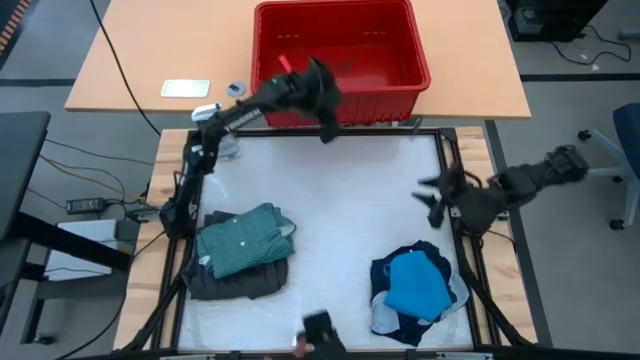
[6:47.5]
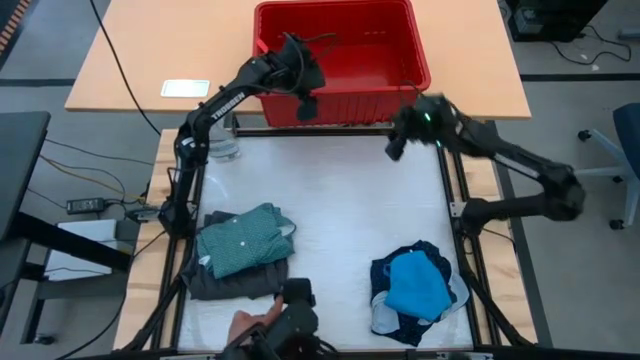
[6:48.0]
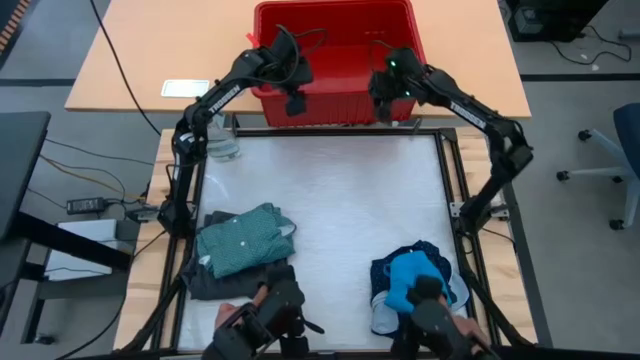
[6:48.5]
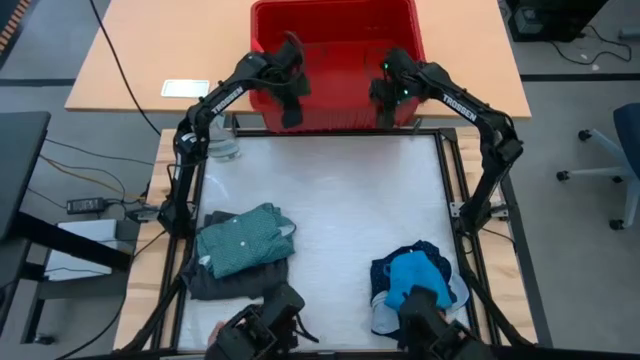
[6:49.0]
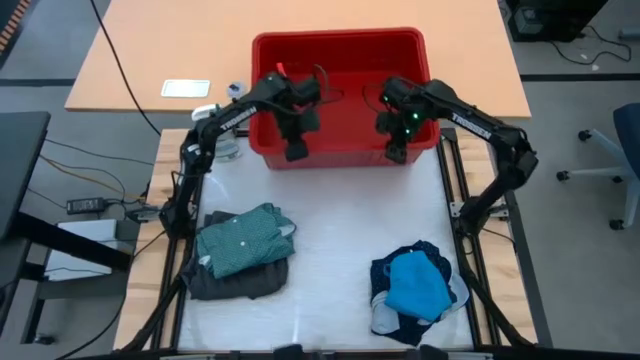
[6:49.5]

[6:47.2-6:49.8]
Task: Fold Laundry from Bin
Adjust the red organizer bin on the table

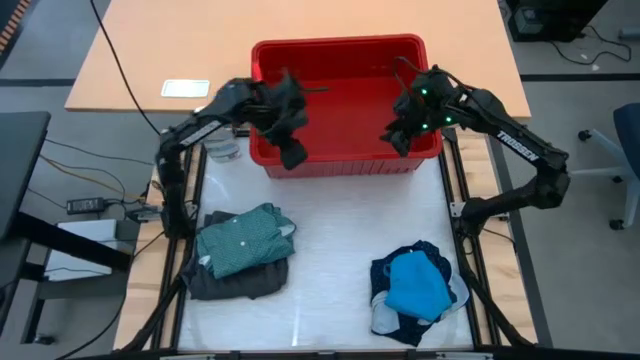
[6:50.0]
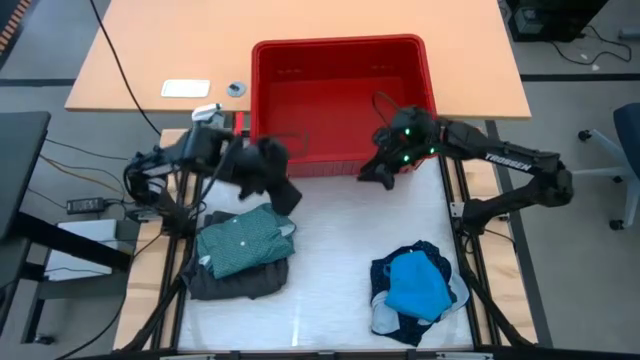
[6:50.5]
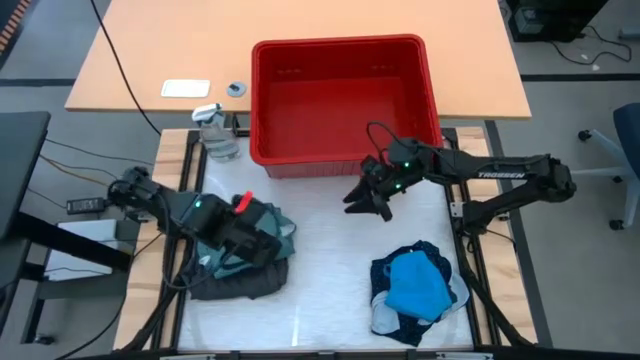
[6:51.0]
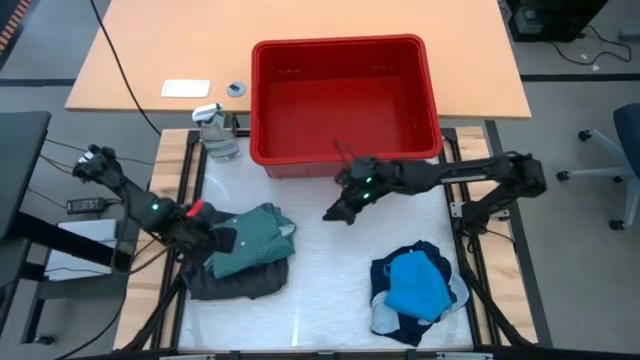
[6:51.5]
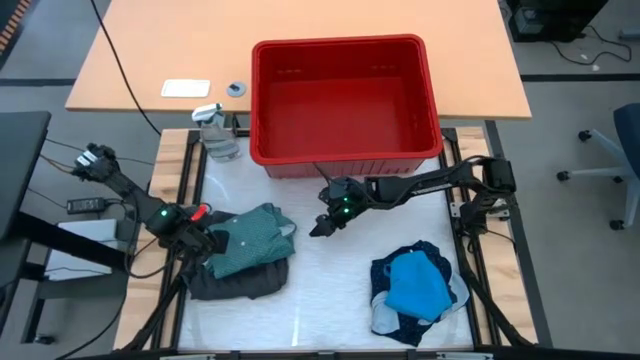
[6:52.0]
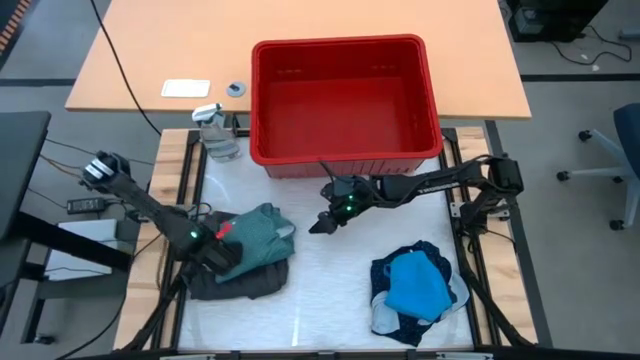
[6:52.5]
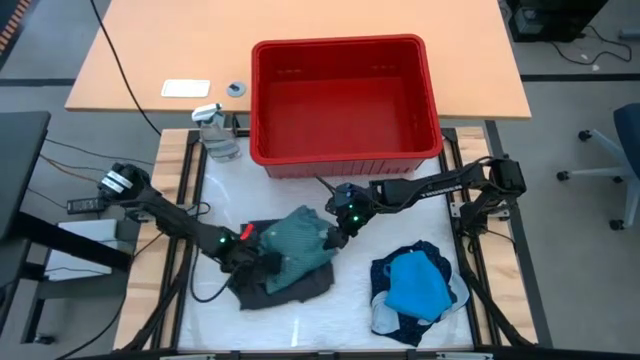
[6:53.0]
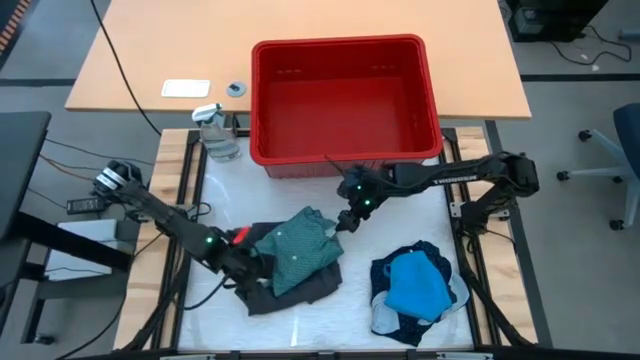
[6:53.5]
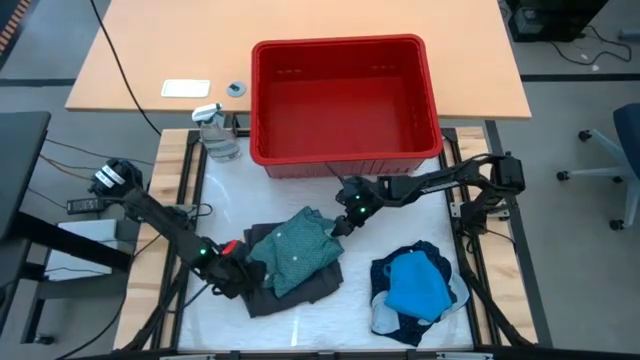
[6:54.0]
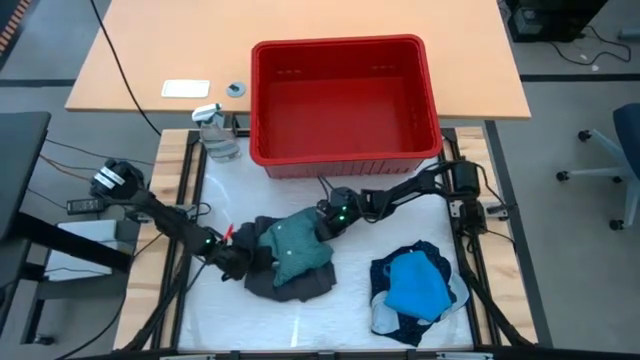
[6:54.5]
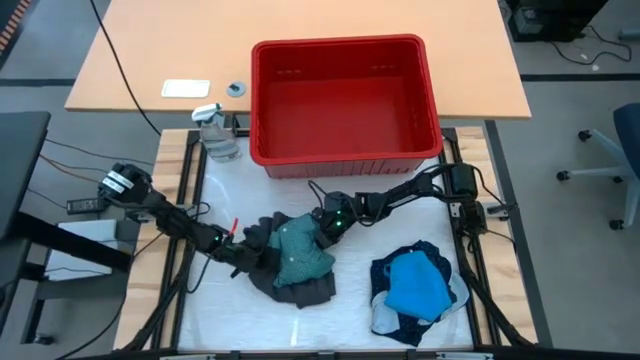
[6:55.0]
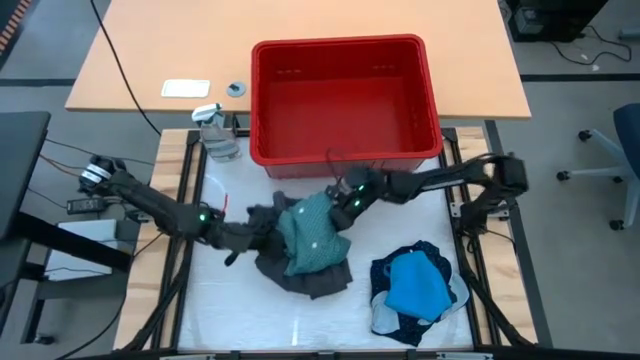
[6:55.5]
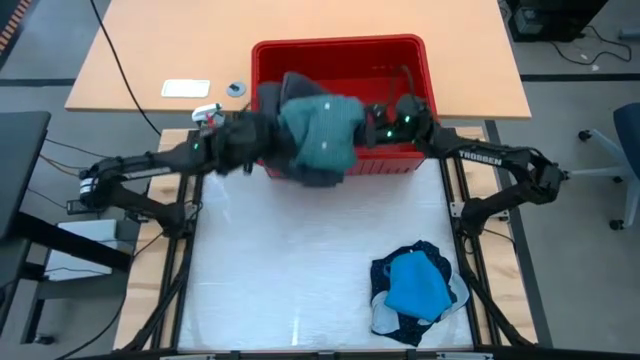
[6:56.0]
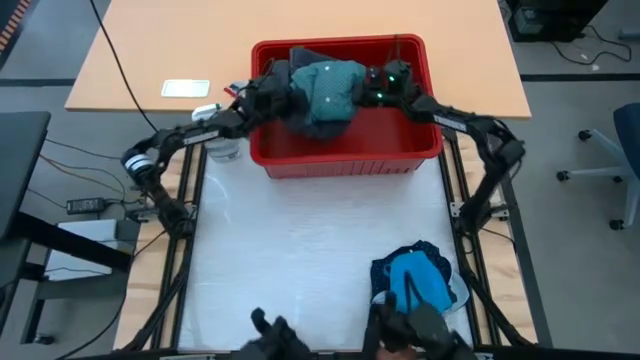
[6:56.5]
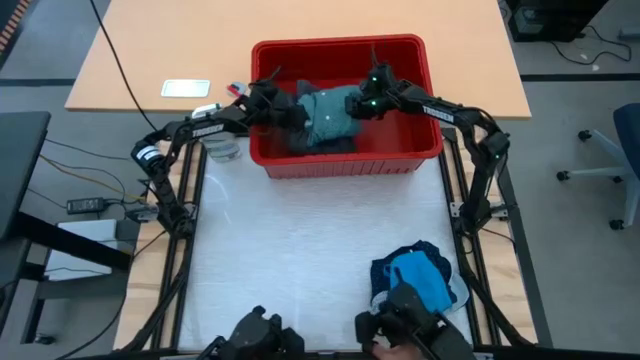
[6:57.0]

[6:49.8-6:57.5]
Put the left stacked clothes into the red organizer bin

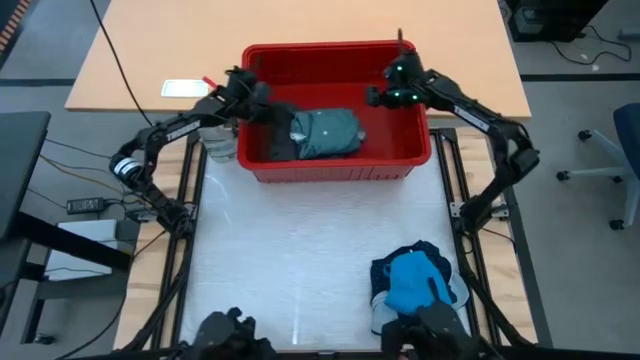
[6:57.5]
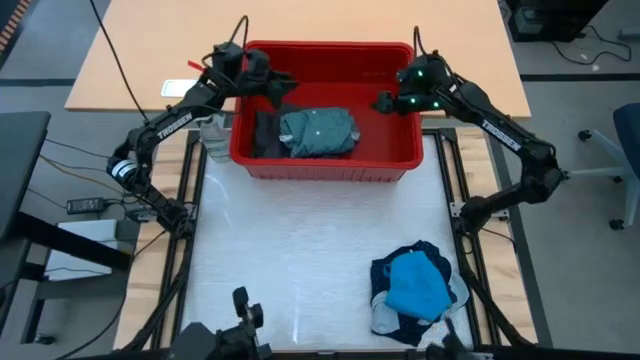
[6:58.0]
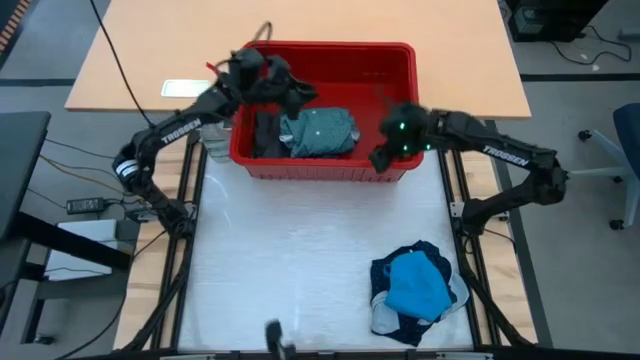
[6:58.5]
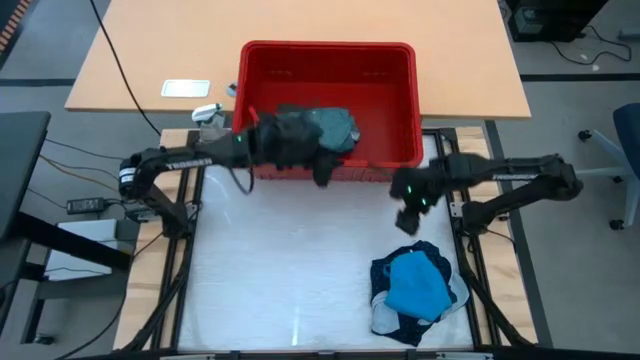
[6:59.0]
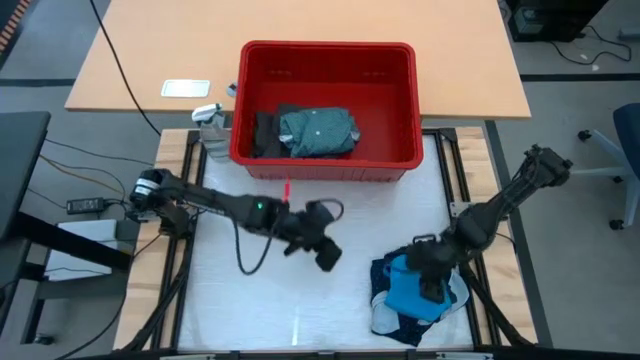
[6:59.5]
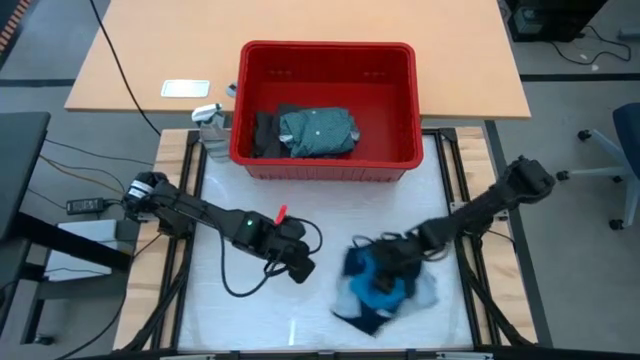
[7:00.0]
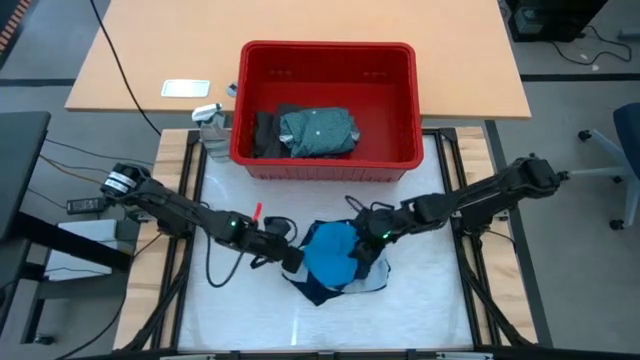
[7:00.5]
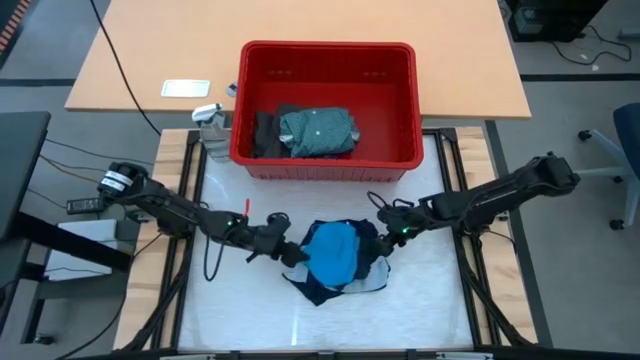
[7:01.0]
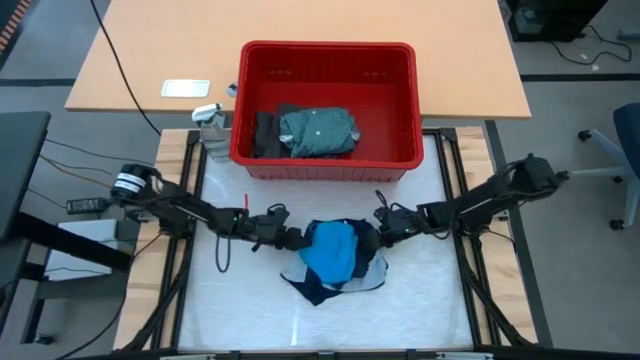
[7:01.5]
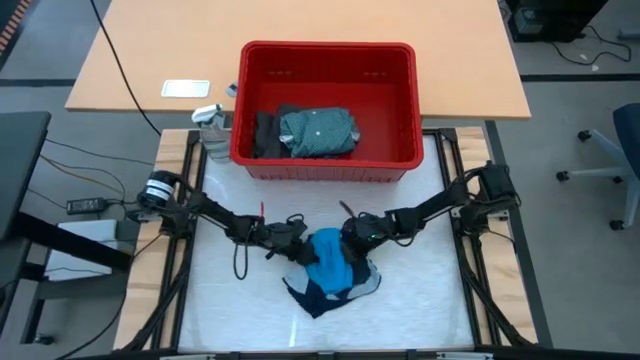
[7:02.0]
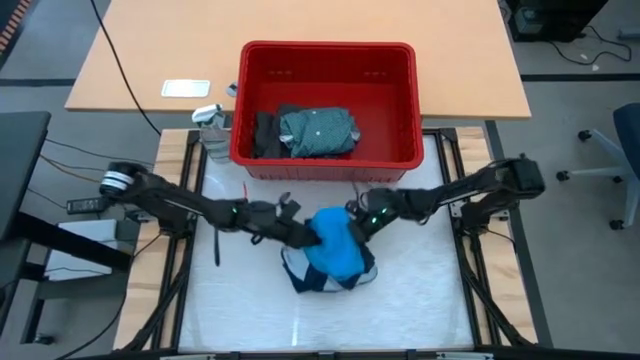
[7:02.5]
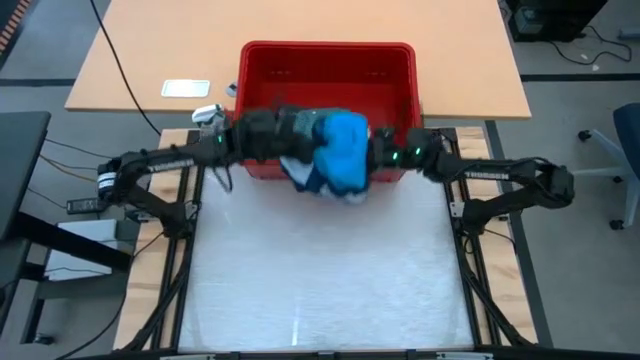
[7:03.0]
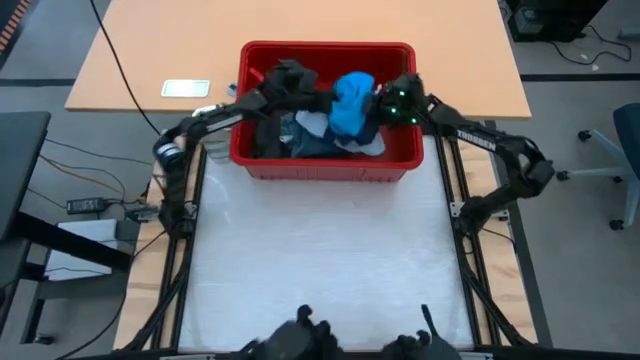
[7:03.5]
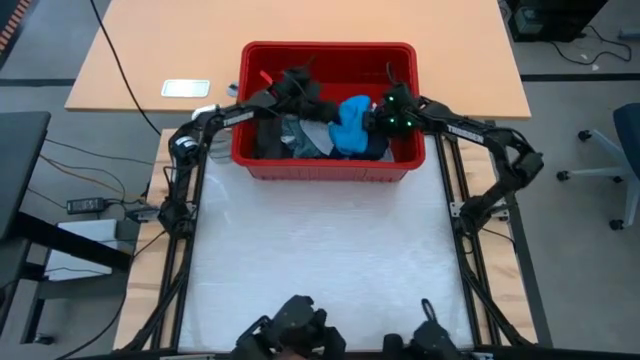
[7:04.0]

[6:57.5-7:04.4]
Put the stacked clothes into the red organizer bin

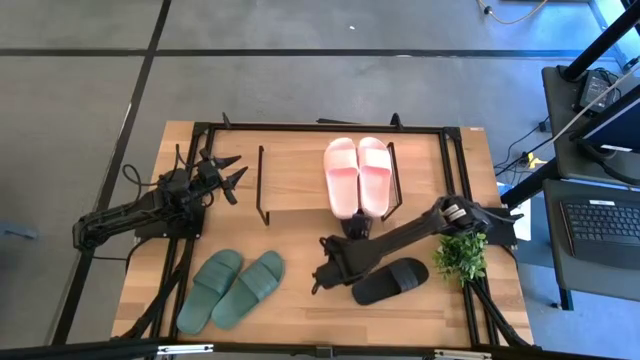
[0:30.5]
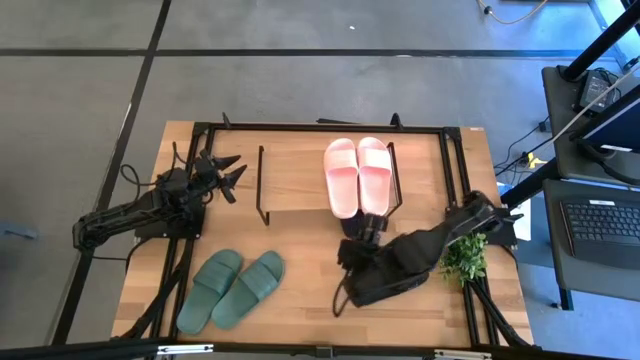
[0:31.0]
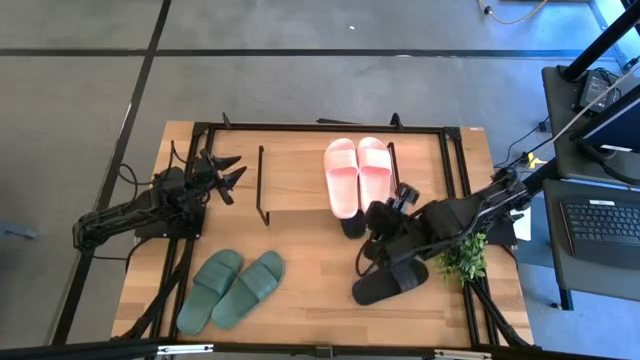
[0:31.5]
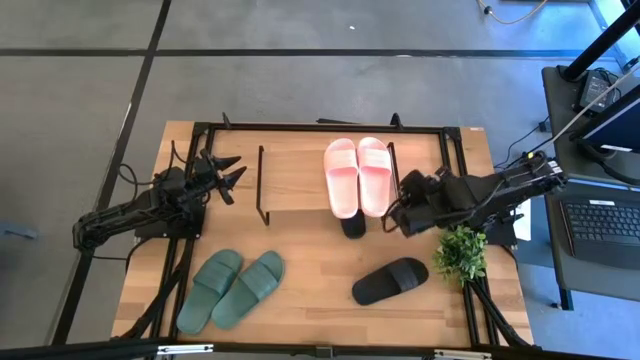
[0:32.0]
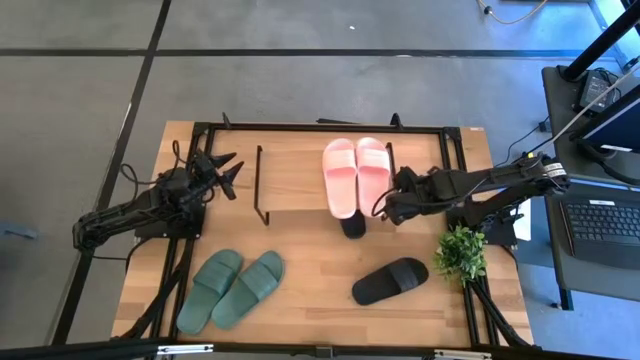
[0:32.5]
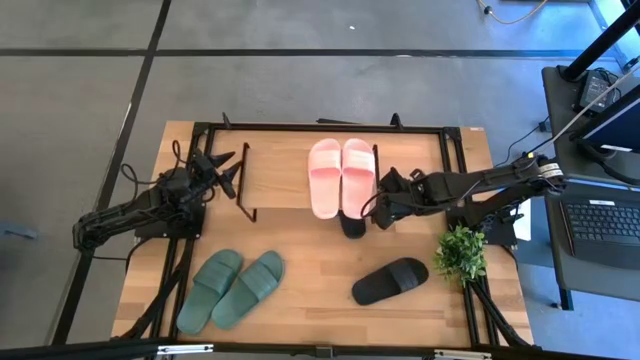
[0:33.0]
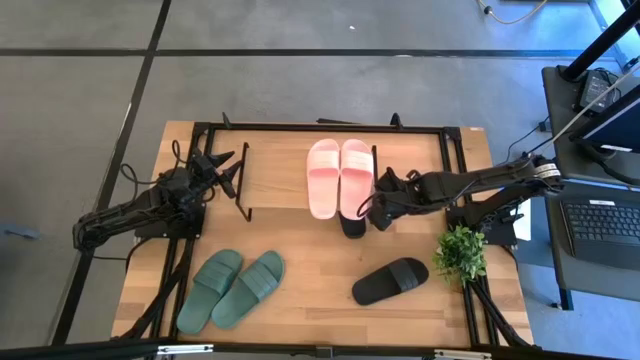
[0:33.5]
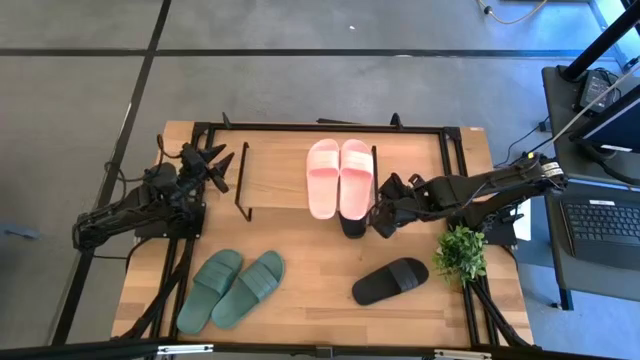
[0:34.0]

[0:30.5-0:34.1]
Task: Pick and place slides into the shelf
Adjust the shelf on the table
